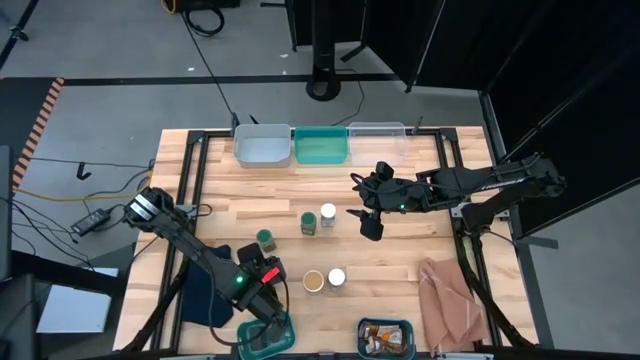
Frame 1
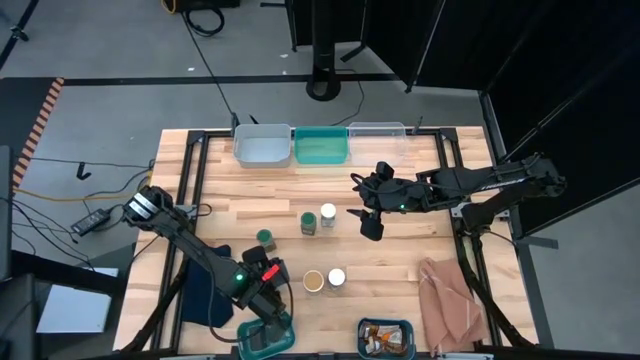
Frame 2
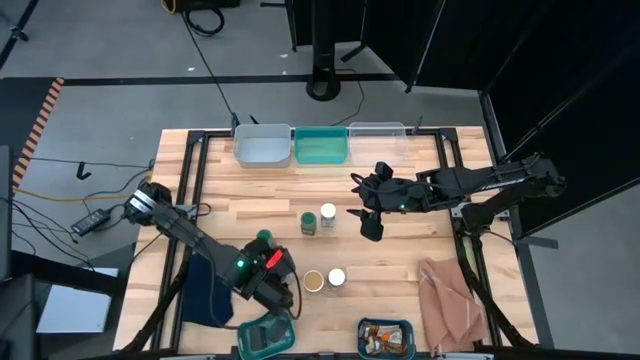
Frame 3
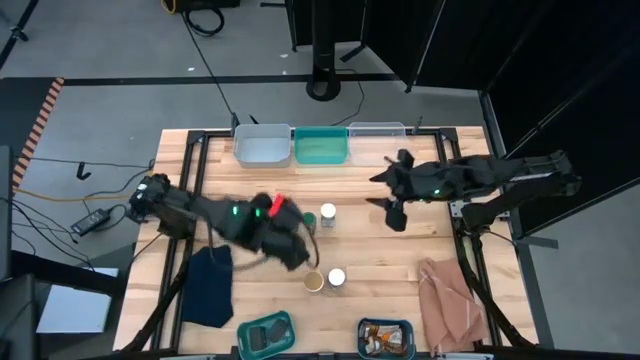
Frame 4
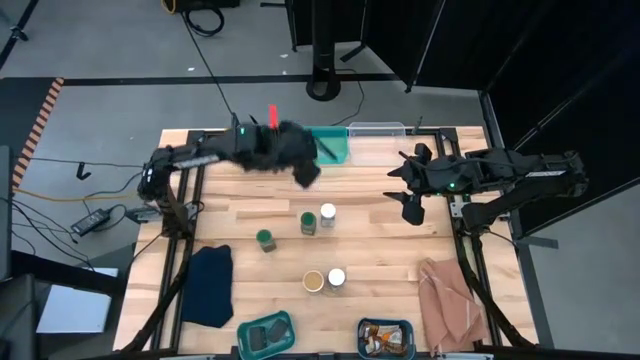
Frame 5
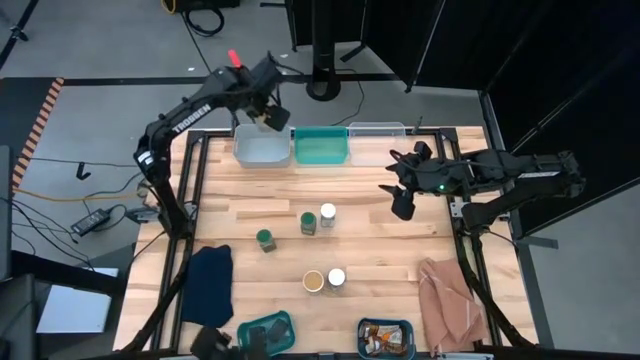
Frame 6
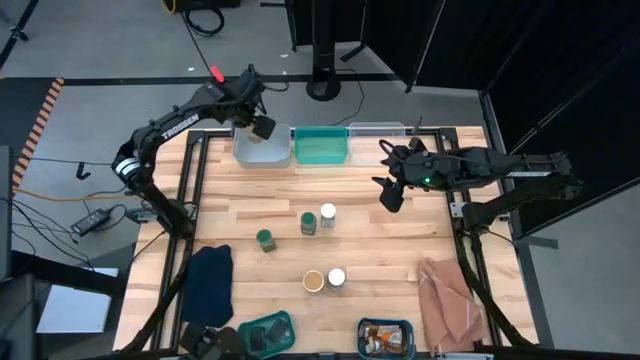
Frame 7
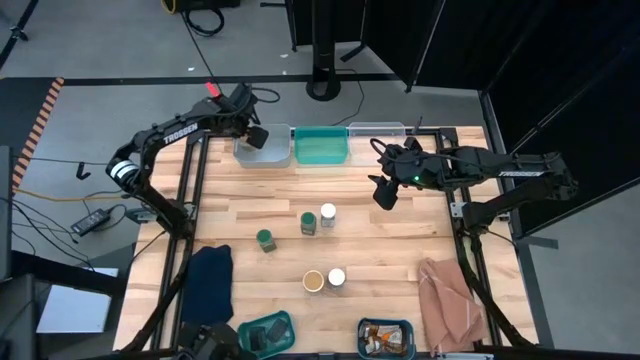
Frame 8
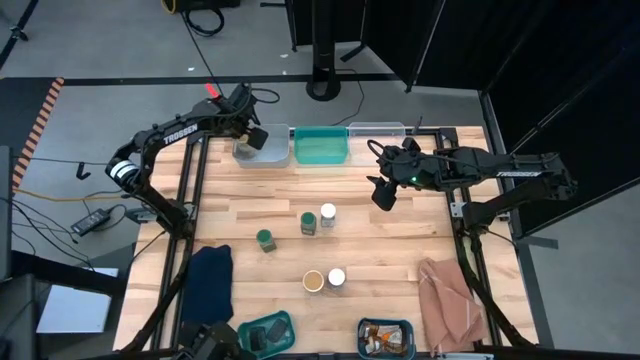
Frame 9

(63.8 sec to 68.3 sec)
Task: Sort spices by type
Put the left gold seasoning bottle into the gray bin

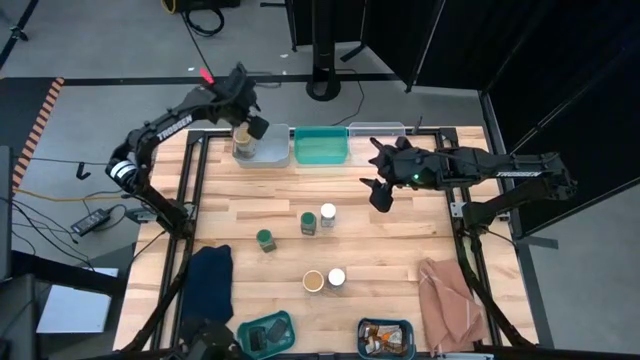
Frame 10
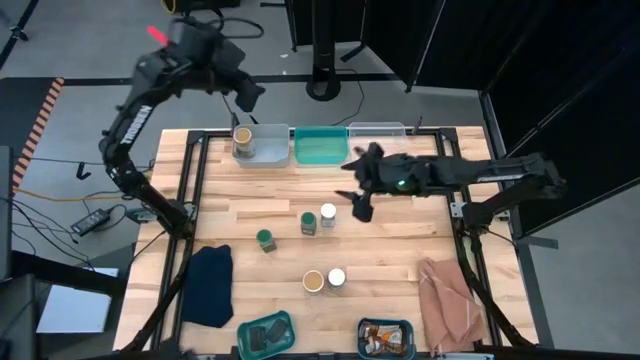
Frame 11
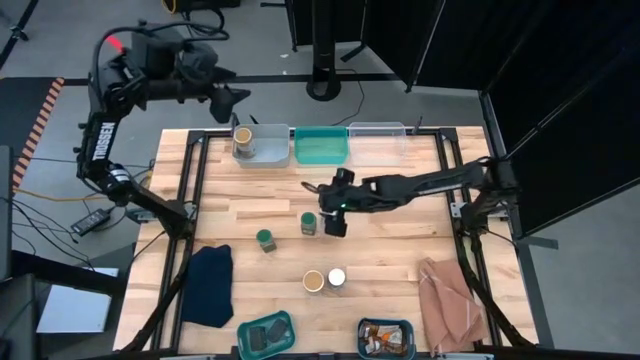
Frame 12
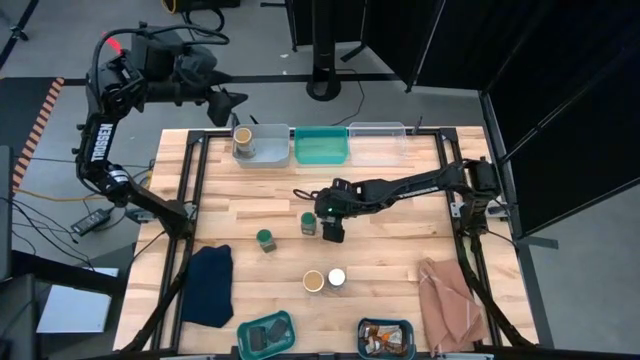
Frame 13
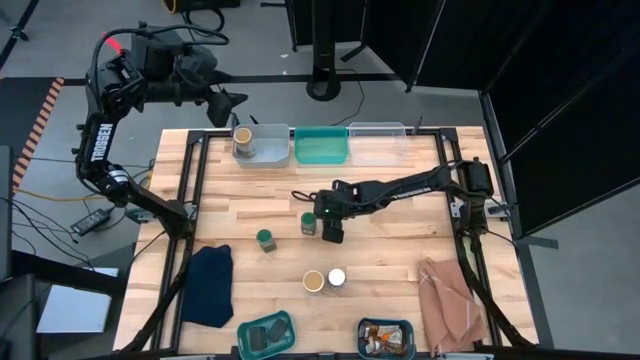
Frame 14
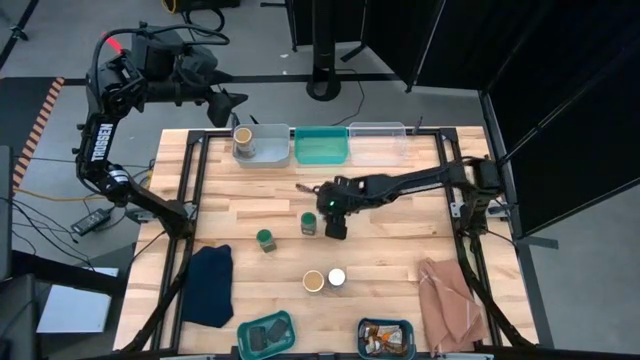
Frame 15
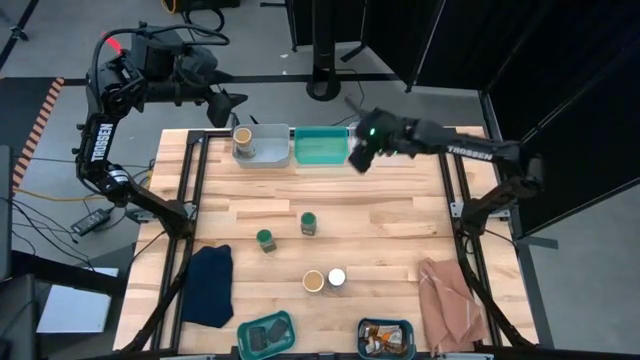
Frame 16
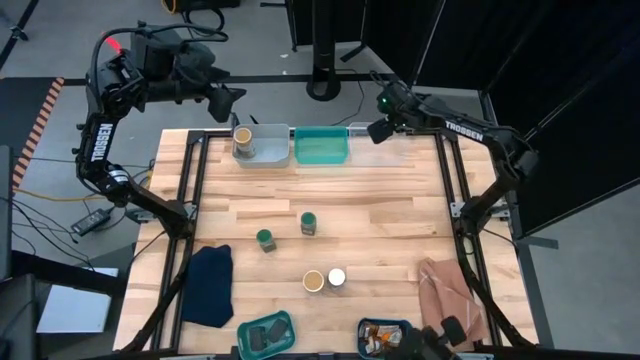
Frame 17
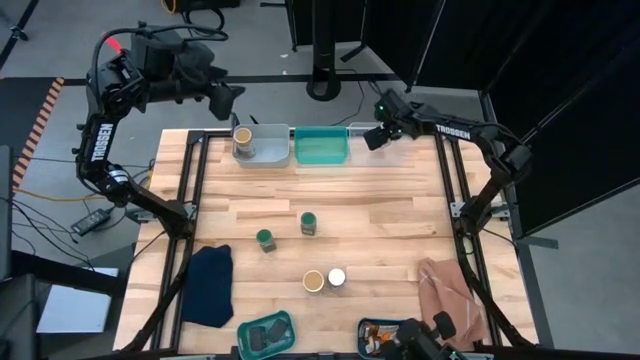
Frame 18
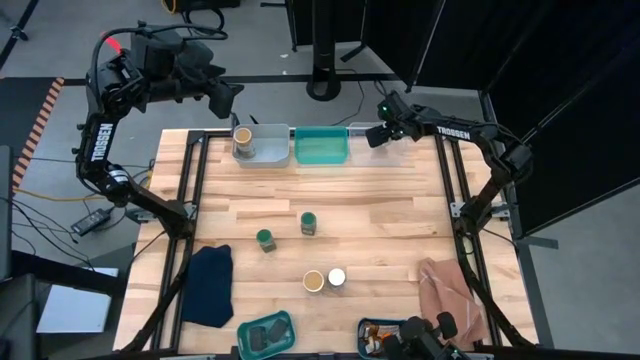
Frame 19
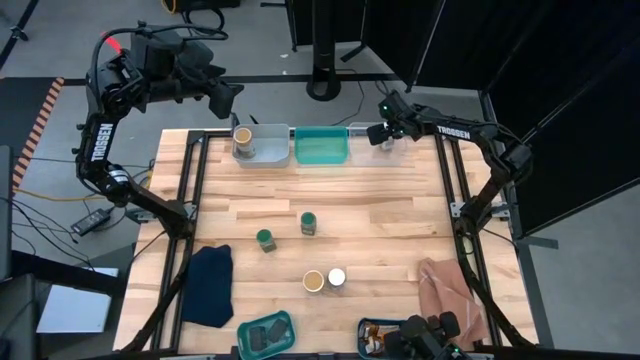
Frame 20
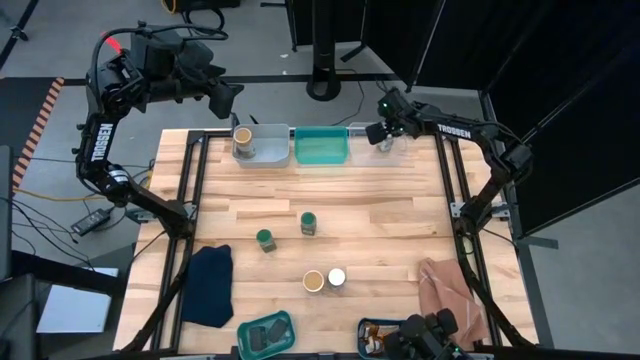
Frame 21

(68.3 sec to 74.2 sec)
Put the top white seasoning bottle into the transparent bin

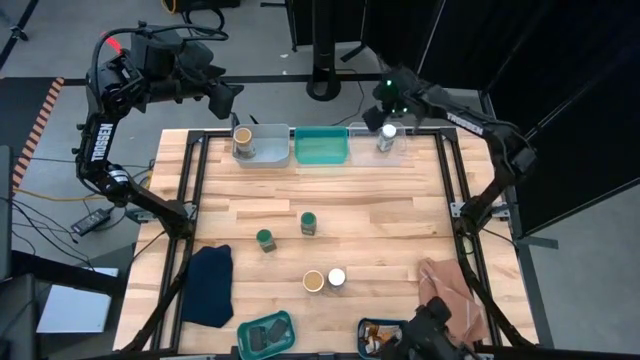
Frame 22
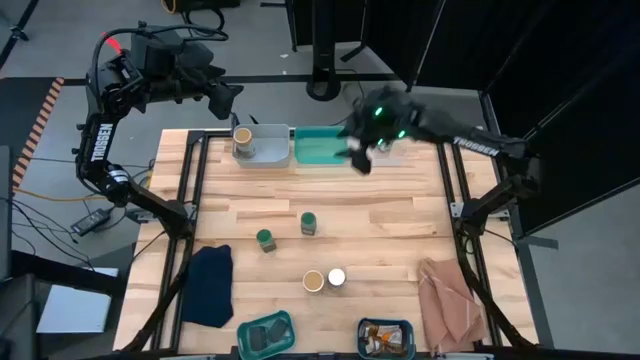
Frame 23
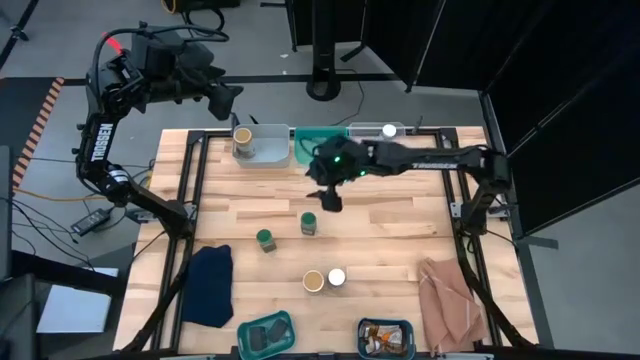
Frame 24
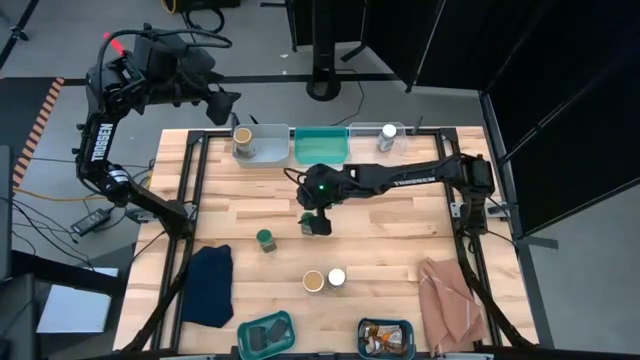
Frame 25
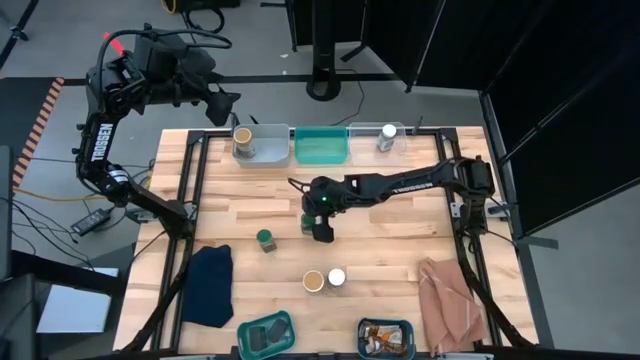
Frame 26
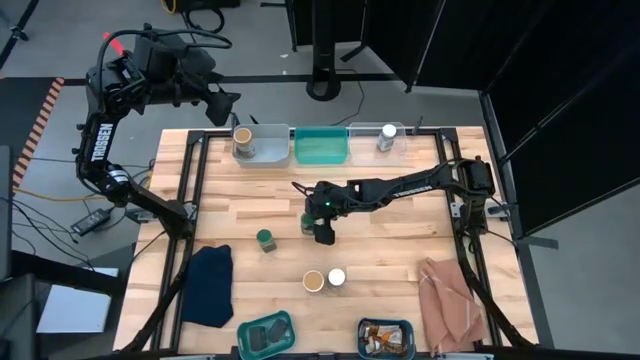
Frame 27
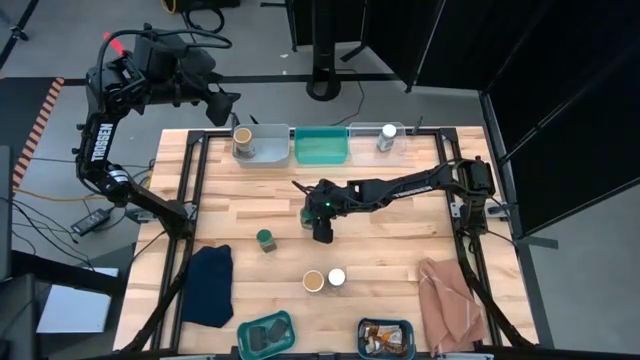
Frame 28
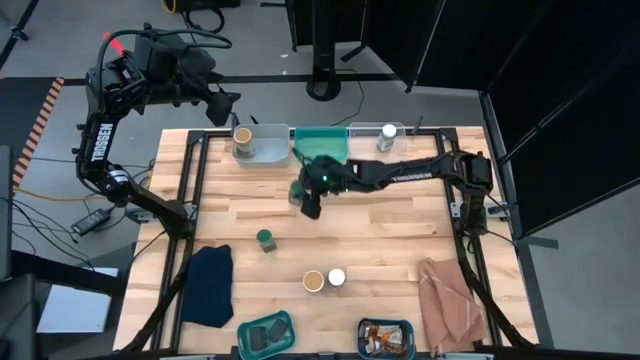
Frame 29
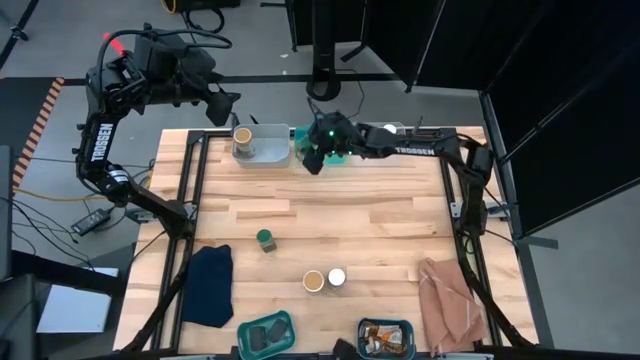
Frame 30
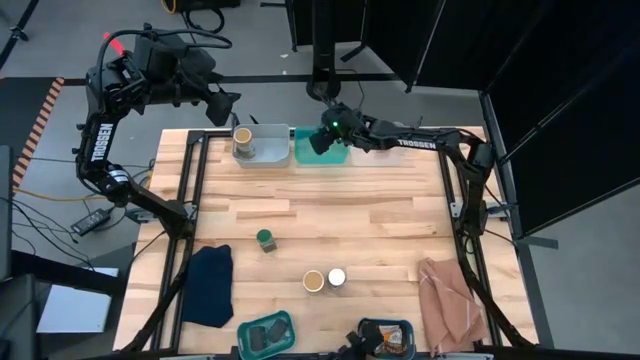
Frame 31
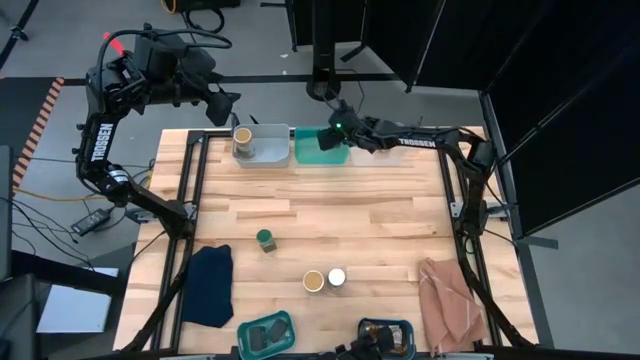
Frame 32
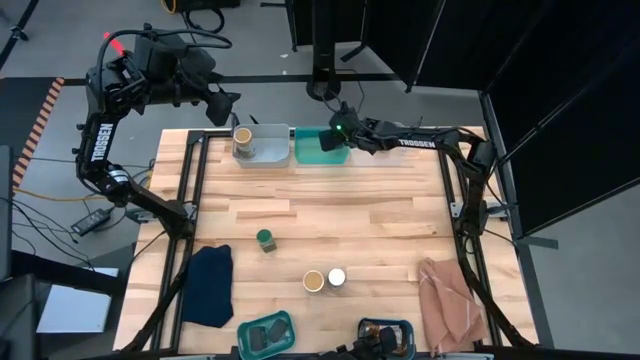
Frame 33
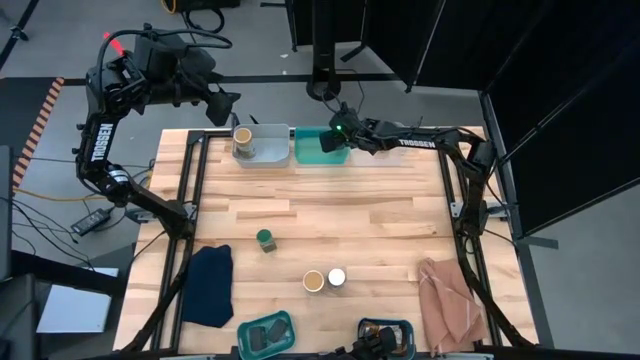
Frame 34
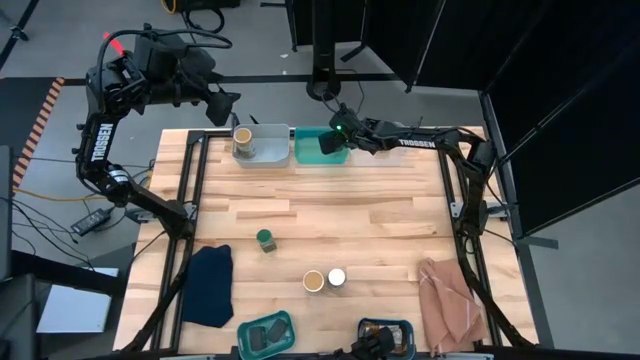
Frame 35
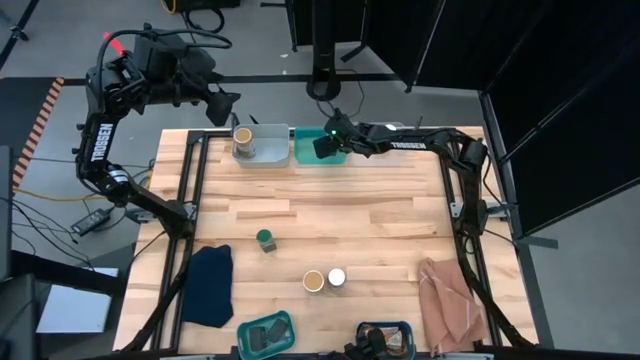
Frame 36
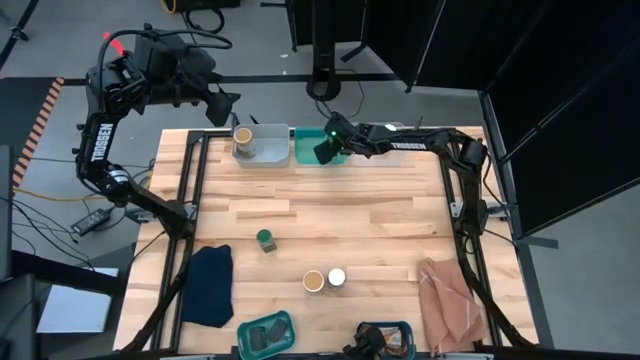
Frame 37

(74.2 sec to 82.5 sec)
Put the right green seasoning bottle into the green bin

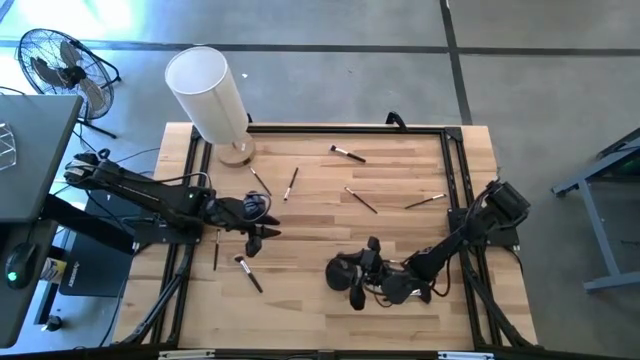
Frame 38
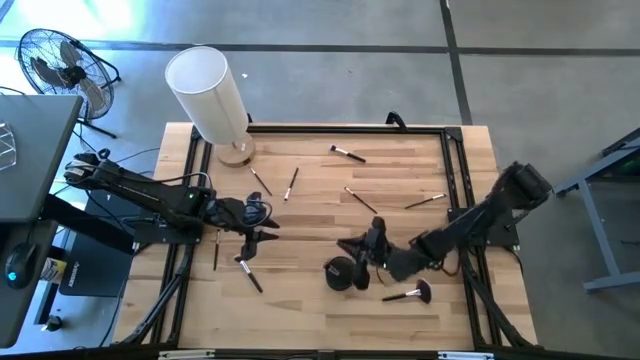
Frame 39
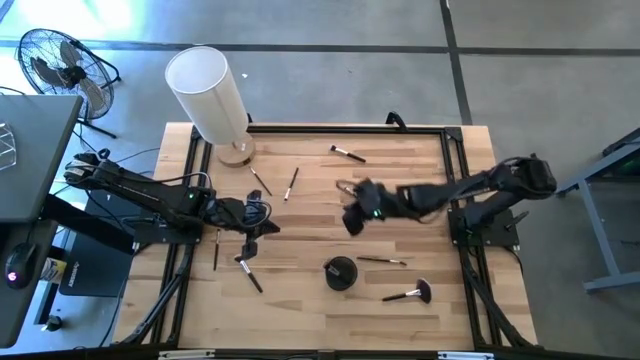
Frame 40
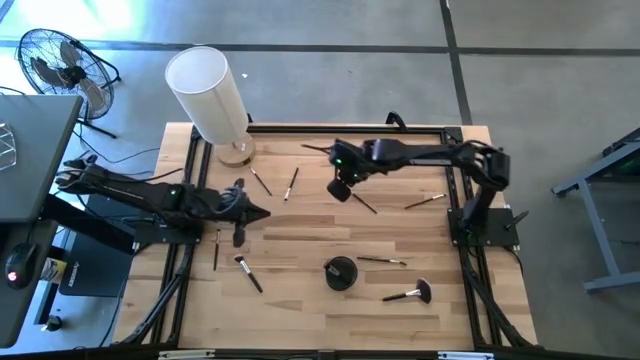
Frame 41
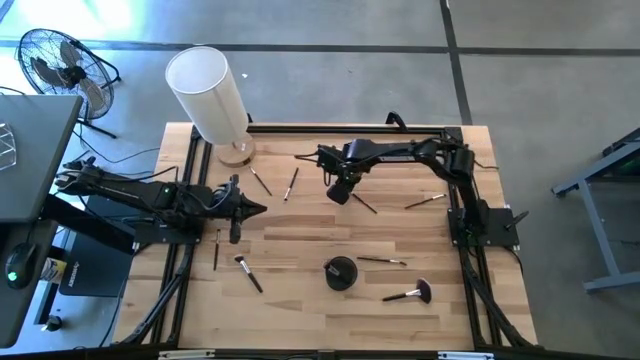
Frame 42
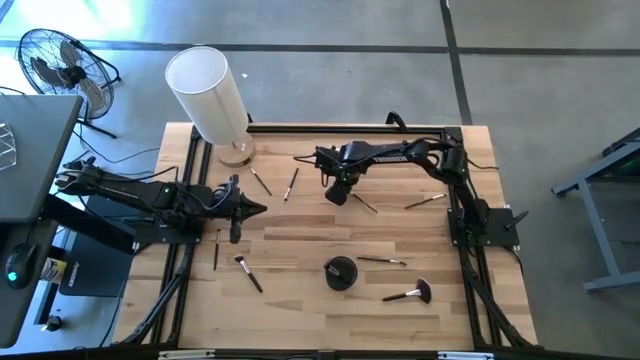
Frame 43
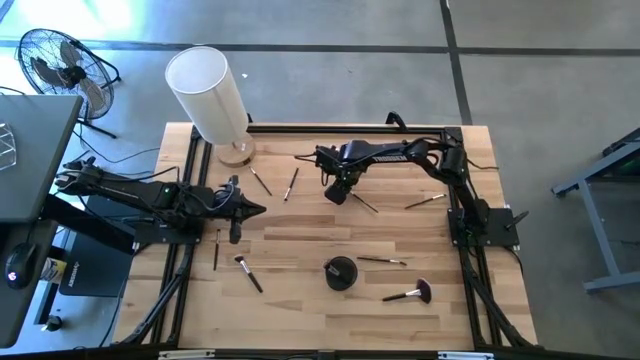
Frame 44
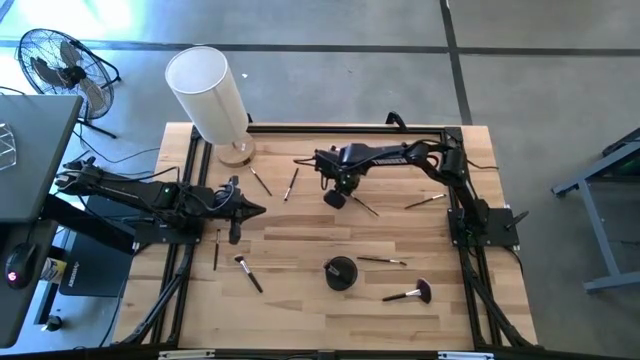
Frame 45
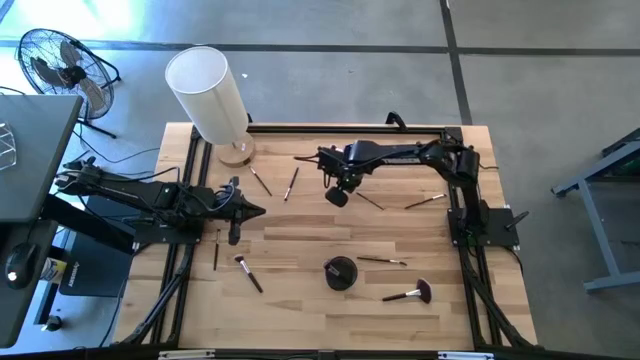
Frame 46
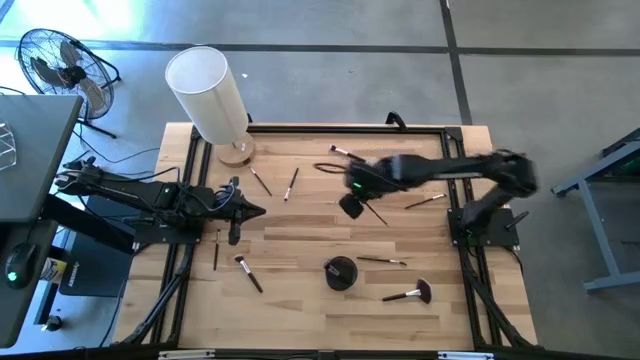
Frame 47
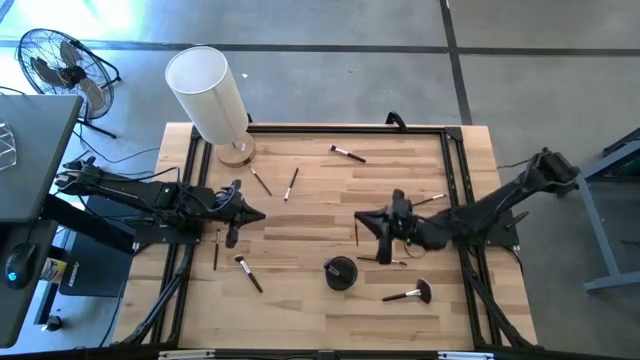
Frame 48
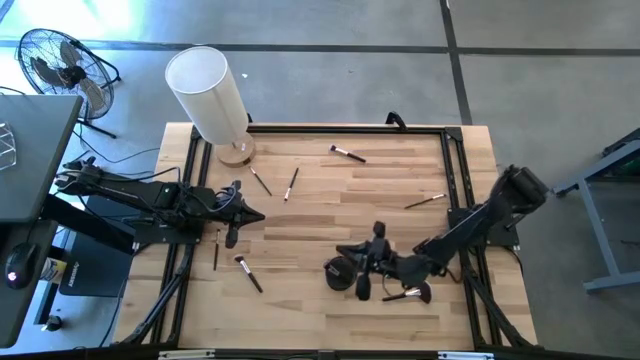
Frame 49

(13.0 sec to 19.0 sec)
Task: Pick & Place Makeup Supplies
Put the makeup brush into the black makeup holder
